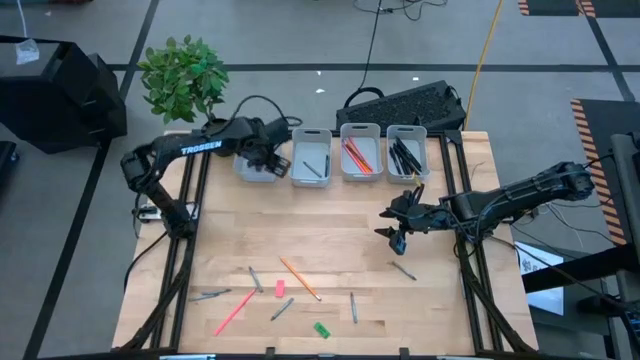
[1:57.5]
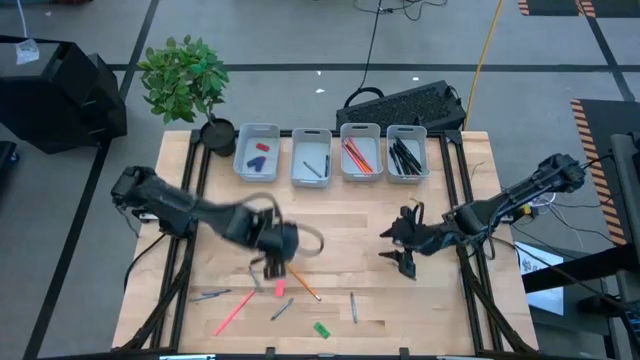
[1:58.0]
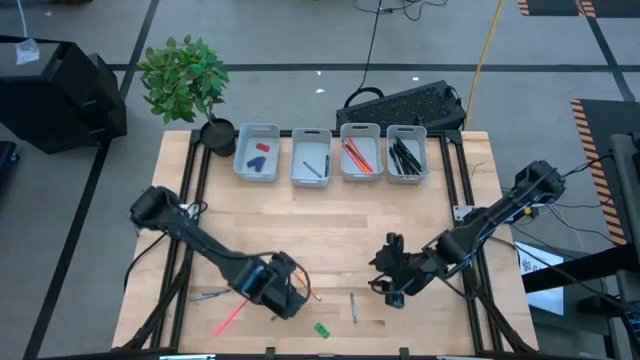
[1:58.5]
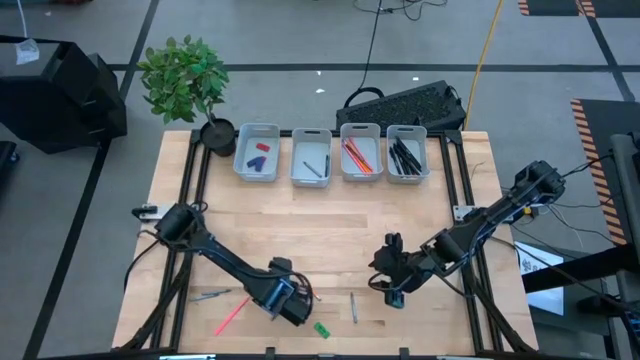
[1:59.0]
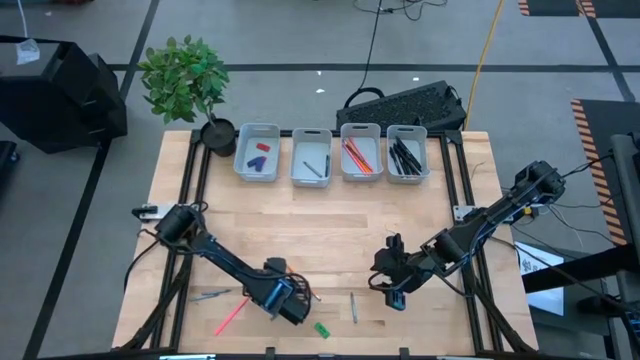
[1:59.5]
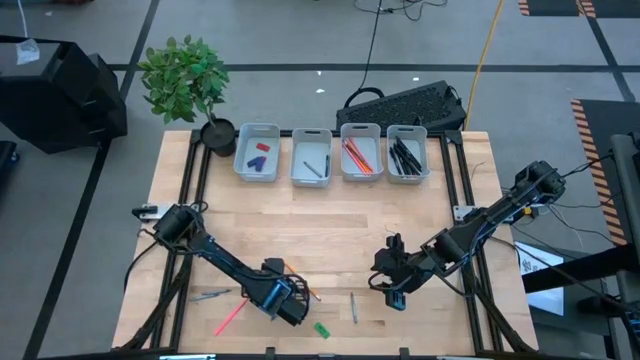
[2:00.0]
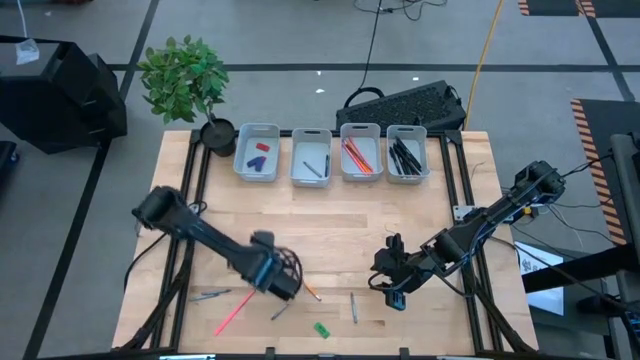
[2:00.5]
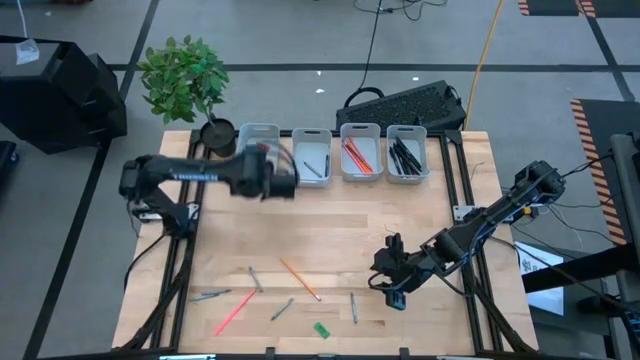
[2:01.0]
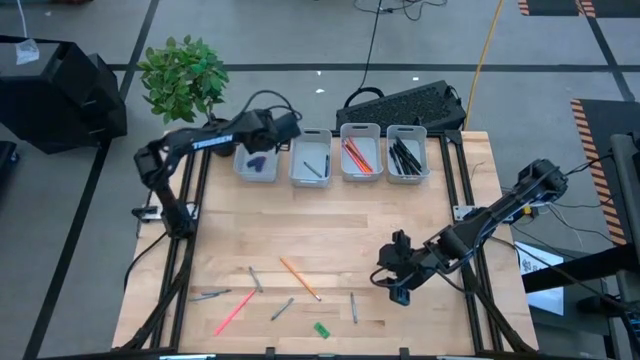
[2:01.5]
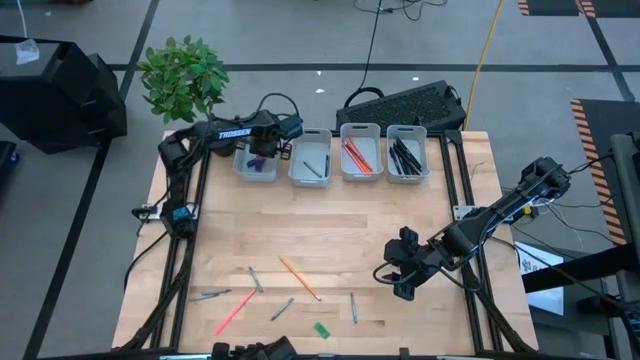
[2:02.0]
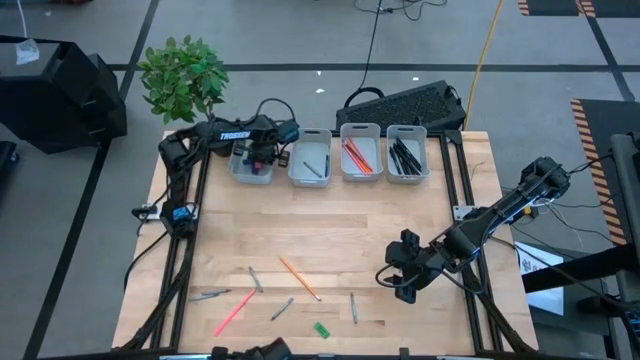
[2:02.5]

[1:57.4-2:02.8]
Task: Sort crayons/erasers/pens/pencils in bins
Put the pink eraser into the top left gray bin

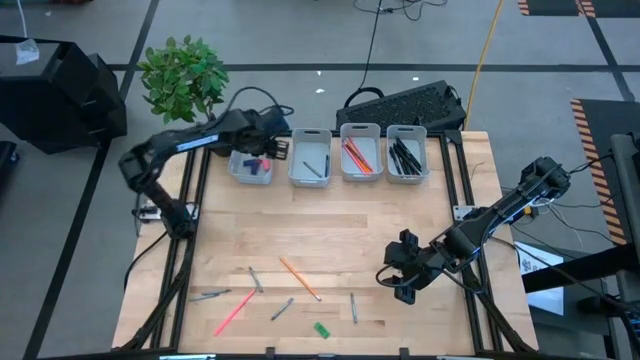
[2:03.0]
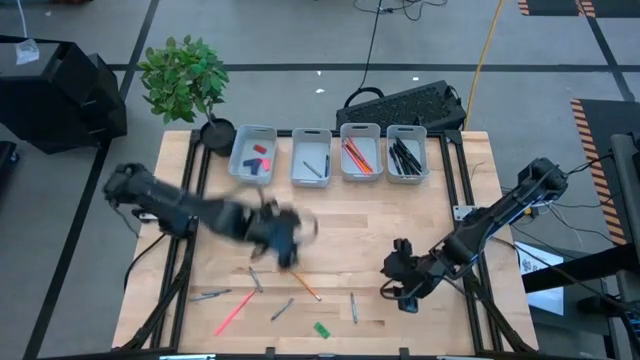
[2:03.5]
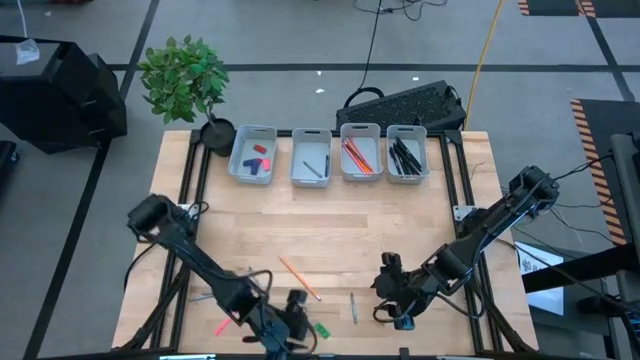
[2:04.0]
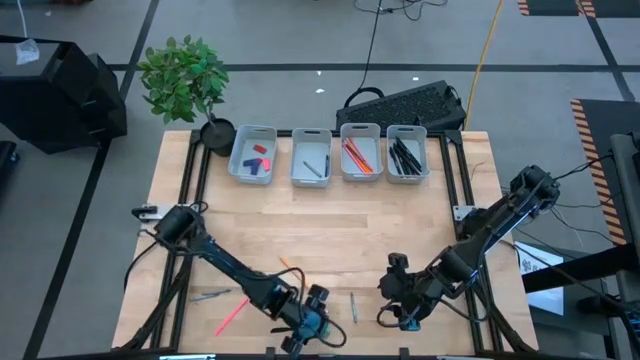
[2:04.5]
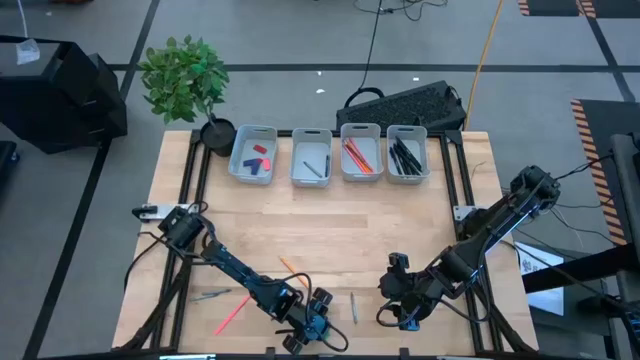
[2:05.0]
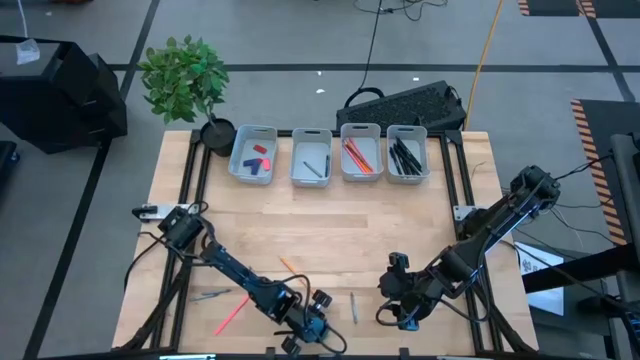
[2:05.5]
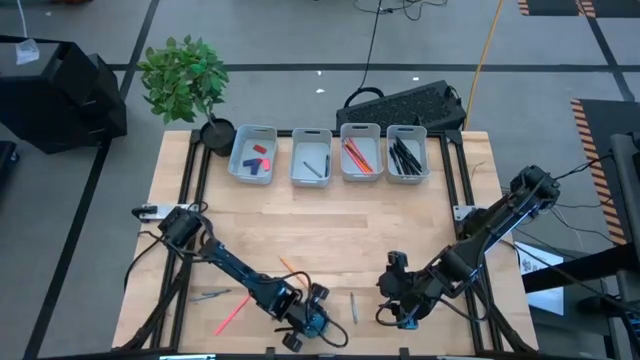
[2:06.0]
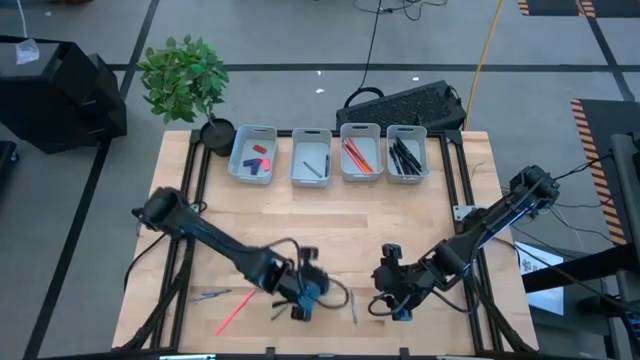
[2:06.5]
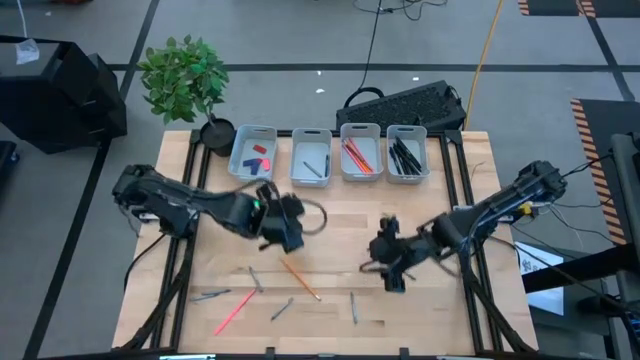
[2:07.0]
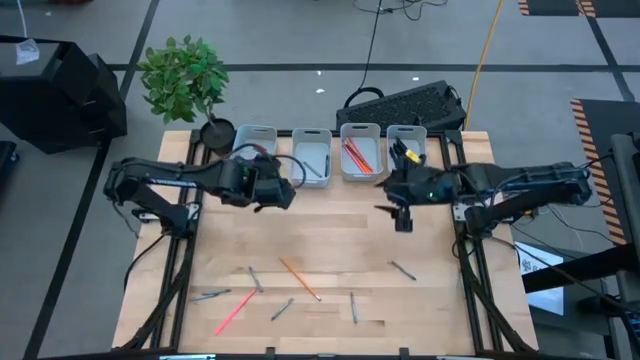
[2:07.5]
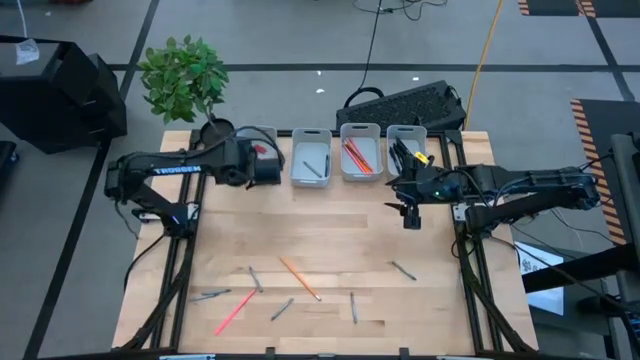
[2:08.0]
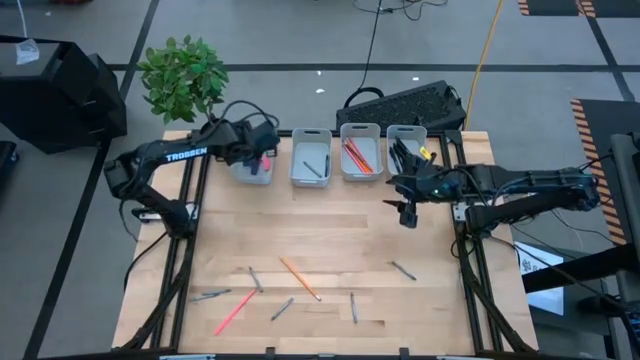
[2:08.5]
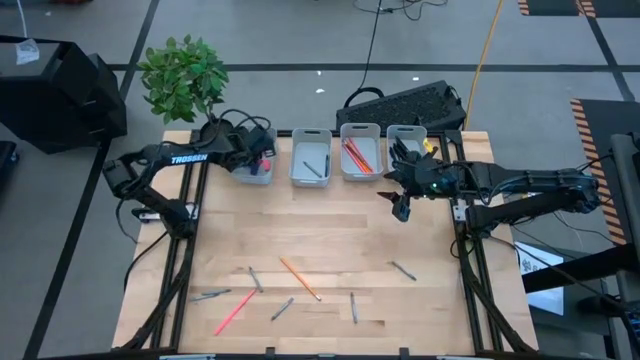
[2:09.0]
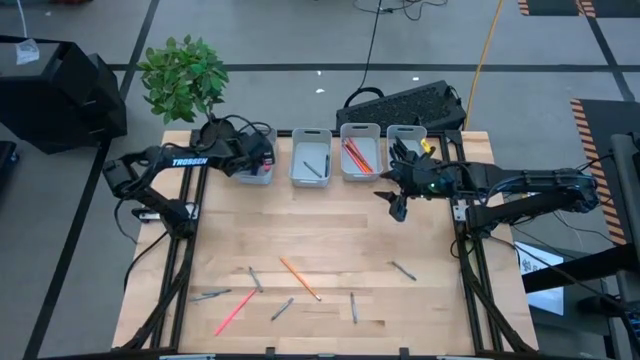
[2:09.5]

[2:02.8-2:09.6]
Put the green eraser into the top left gray bin

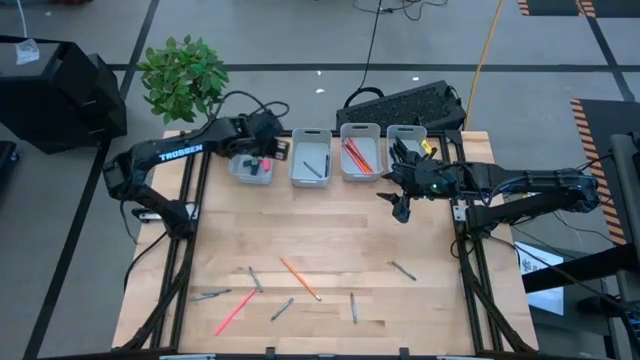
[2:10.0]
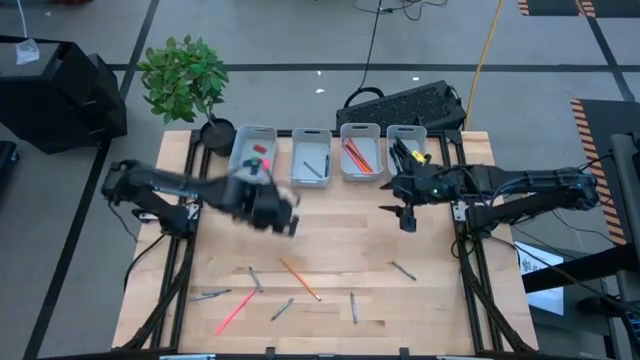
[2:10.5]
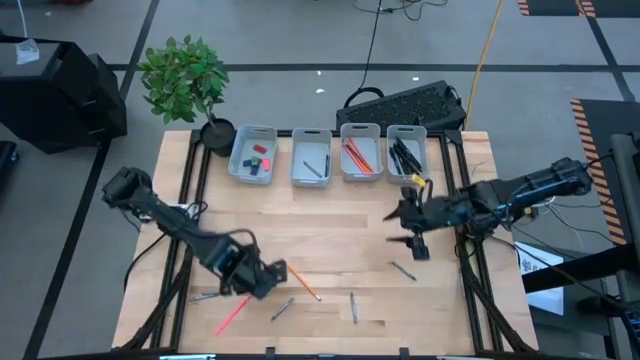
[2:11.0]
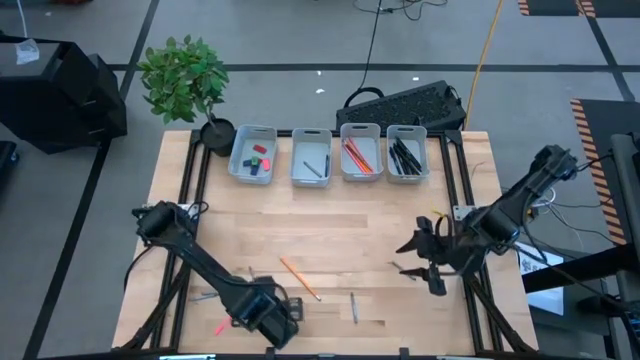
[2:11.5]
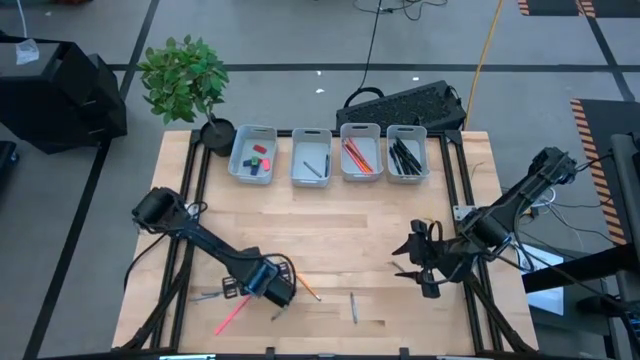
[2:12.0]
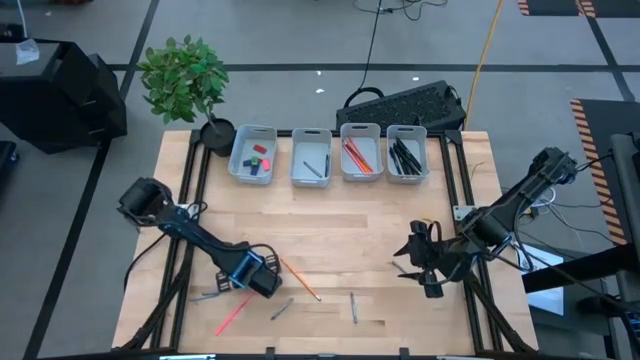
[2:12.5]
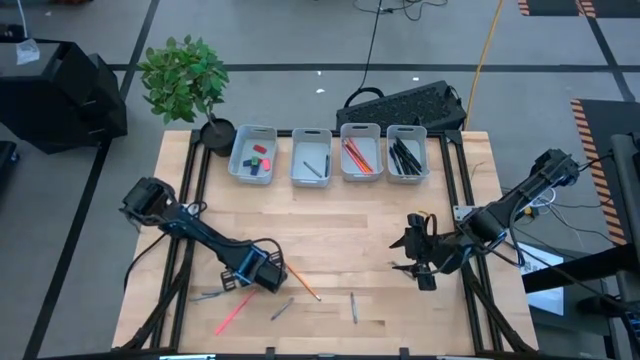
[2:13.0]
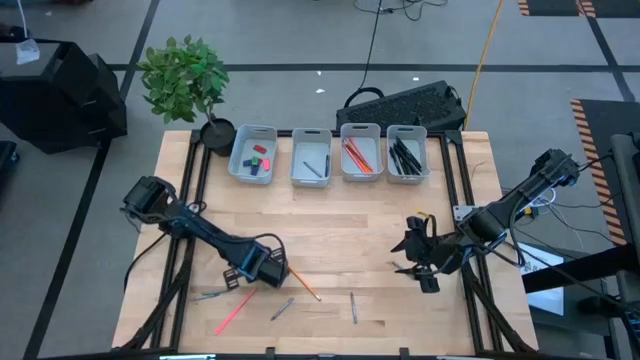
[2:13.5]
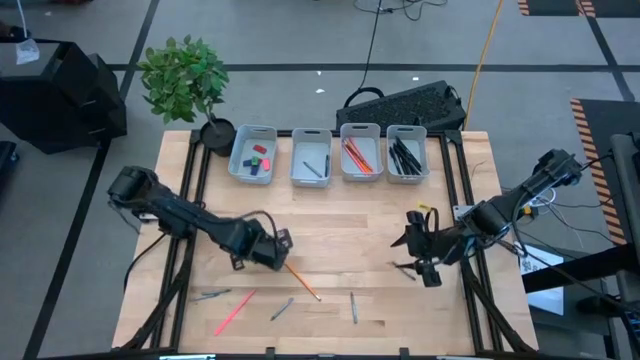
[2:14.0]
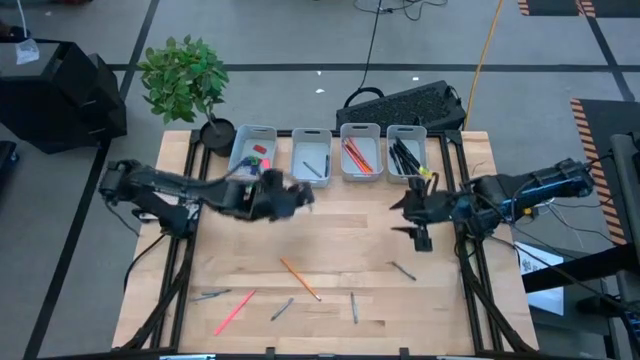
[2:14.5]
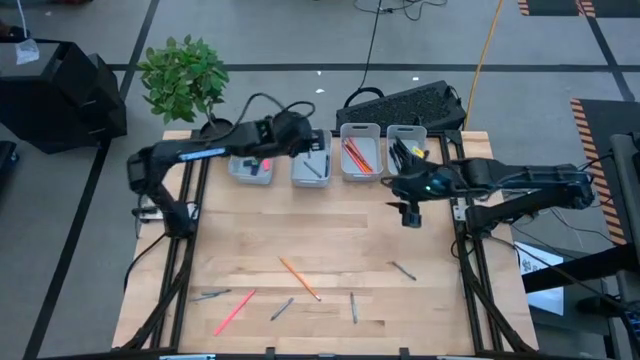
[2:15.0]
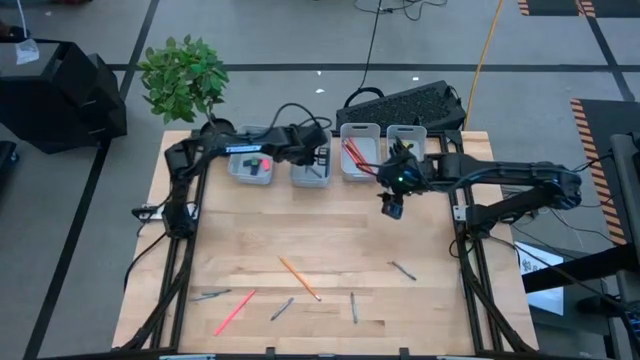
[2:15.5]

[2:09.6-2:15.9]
Put the gray crayon into the middle left gray bin

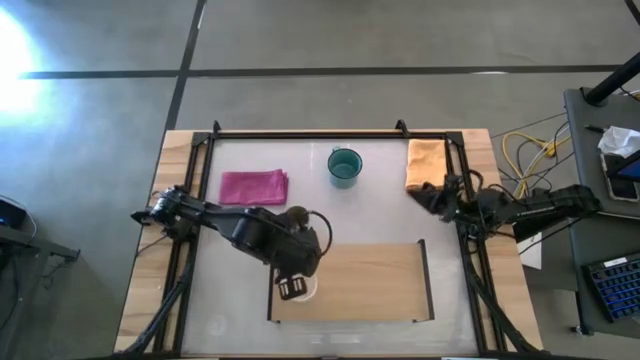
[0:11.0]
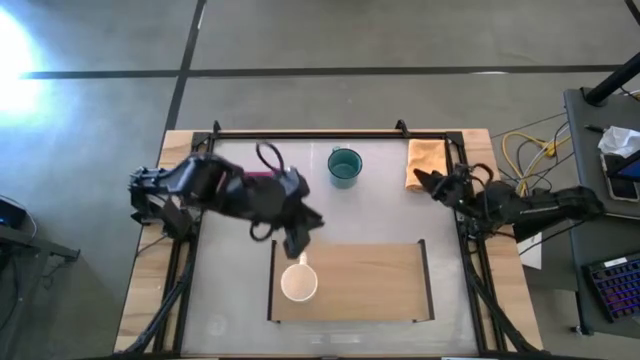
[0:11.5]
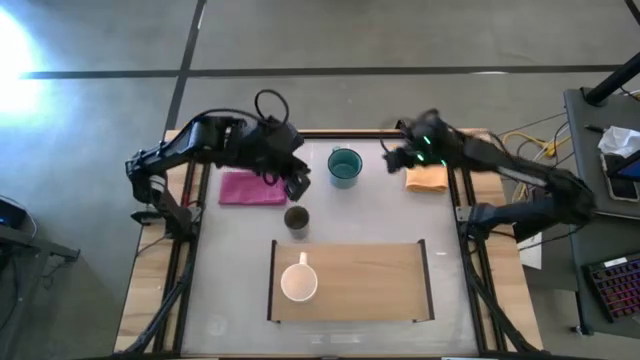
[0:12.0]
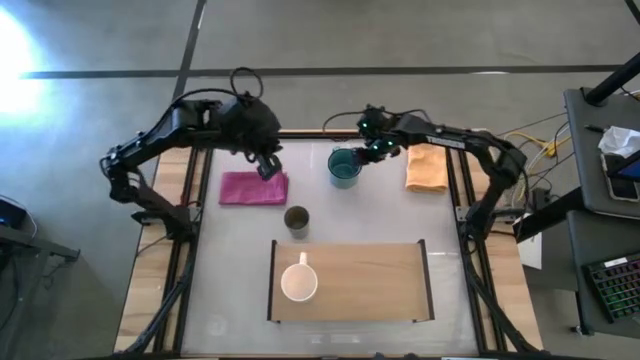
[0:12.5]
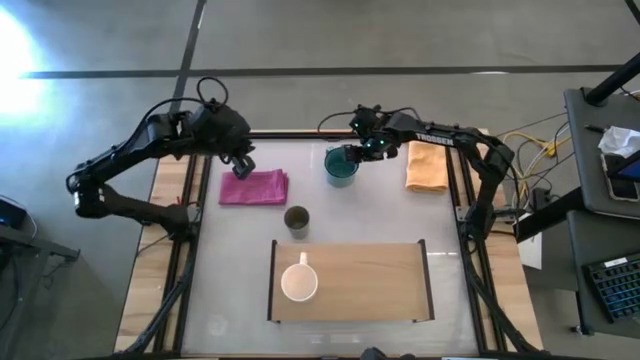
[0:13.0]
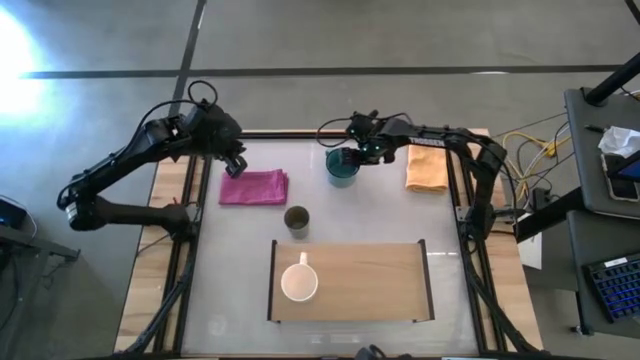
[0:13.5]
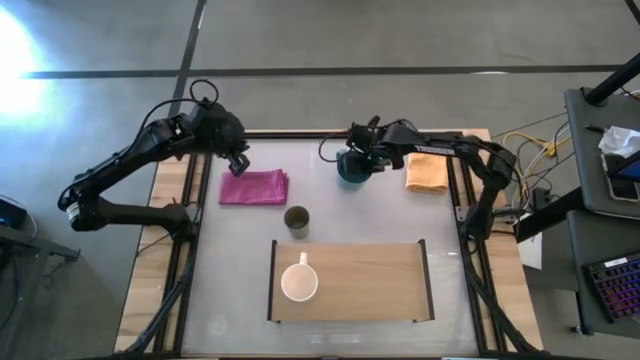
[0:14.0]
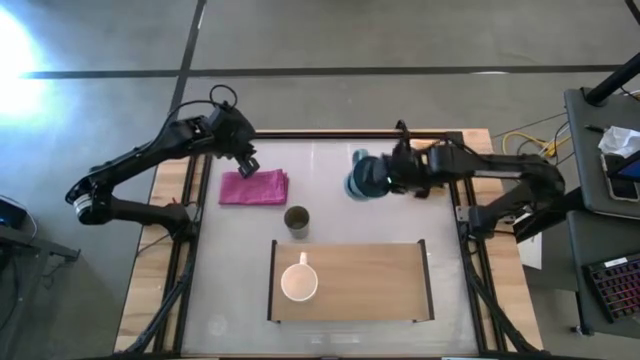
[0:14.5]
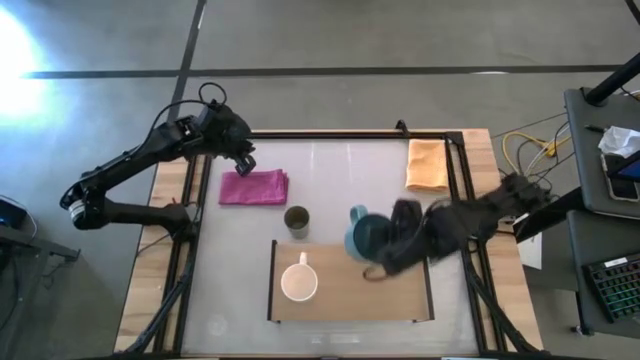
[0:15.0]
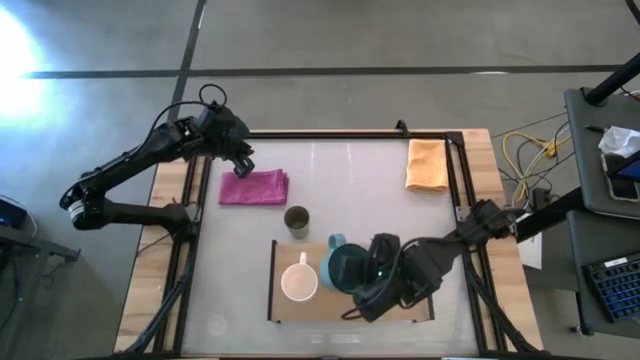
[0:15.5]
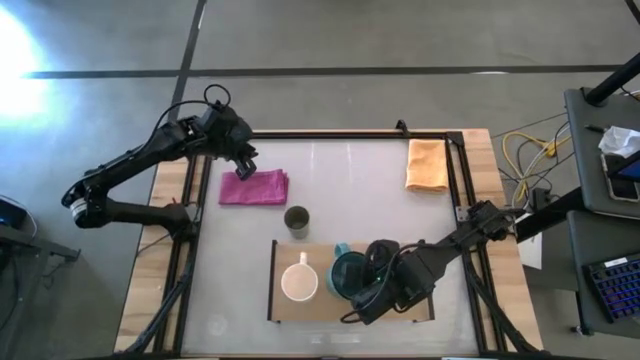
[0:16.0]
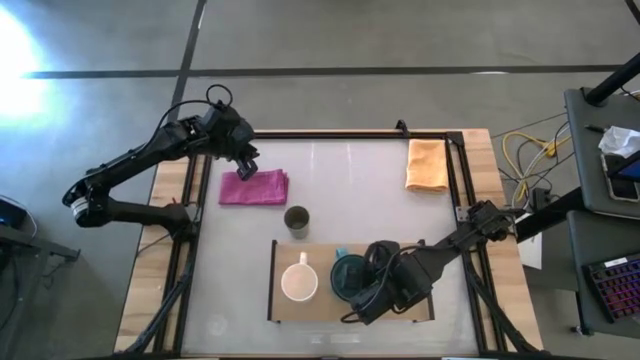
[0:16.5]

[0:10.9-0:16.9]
Task: Stack small to large cups/mugs on shelf
Put the blue mug on the shelf
